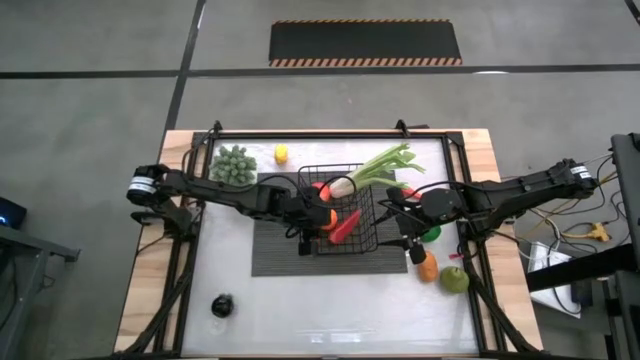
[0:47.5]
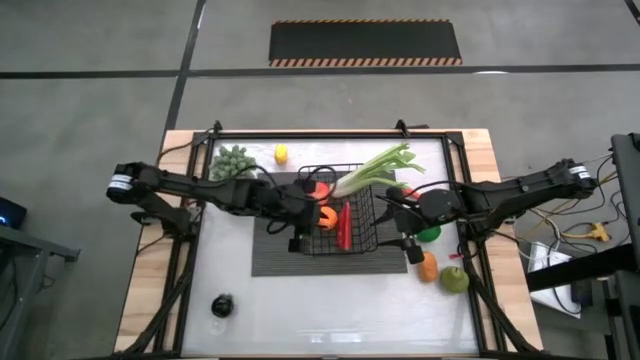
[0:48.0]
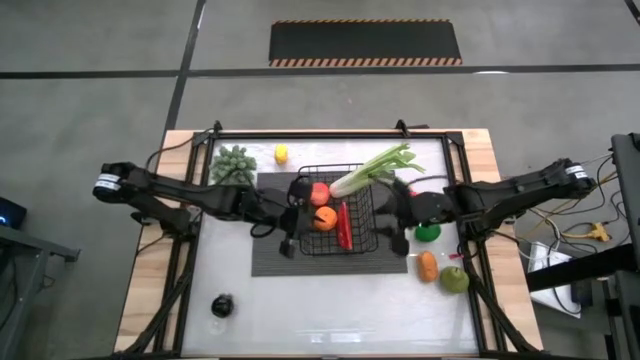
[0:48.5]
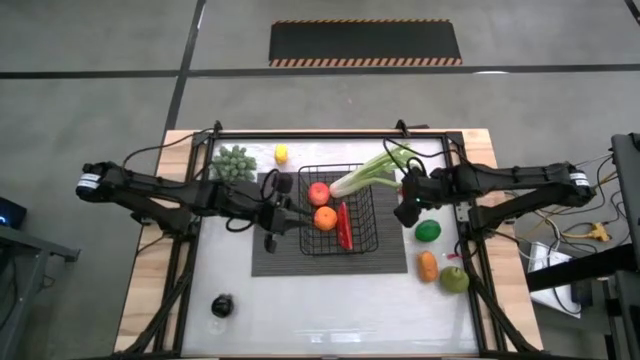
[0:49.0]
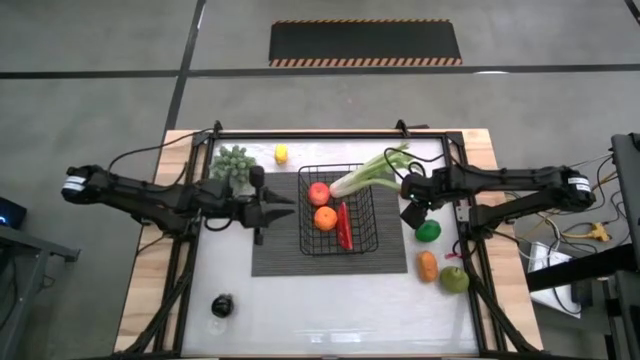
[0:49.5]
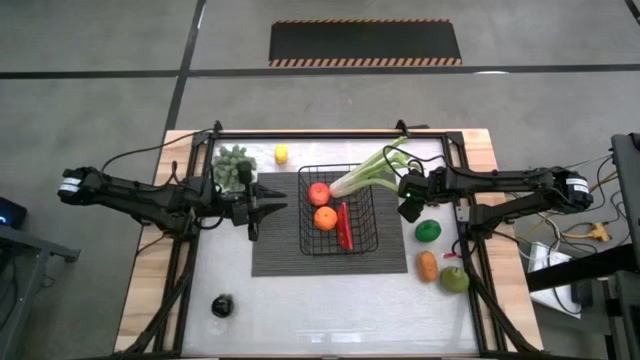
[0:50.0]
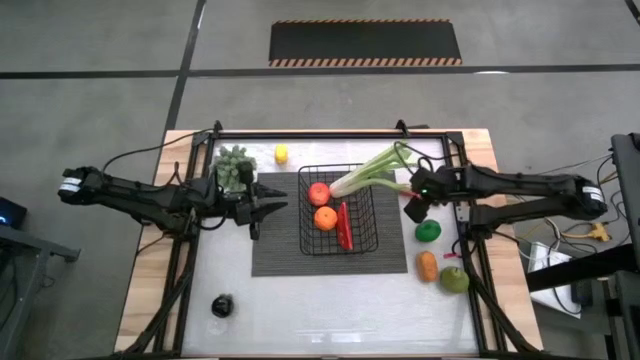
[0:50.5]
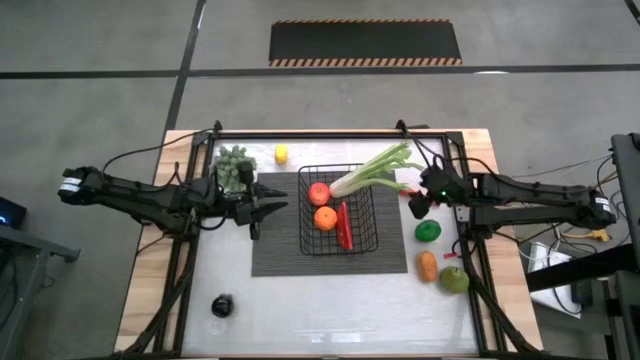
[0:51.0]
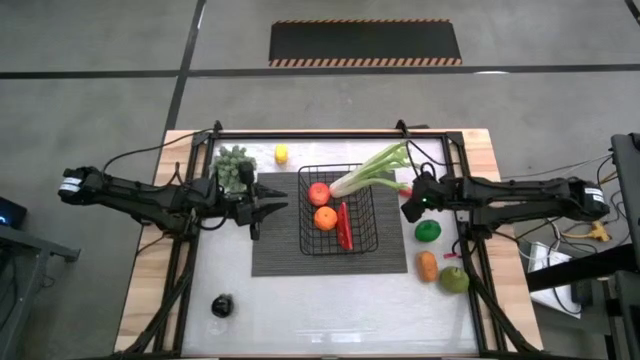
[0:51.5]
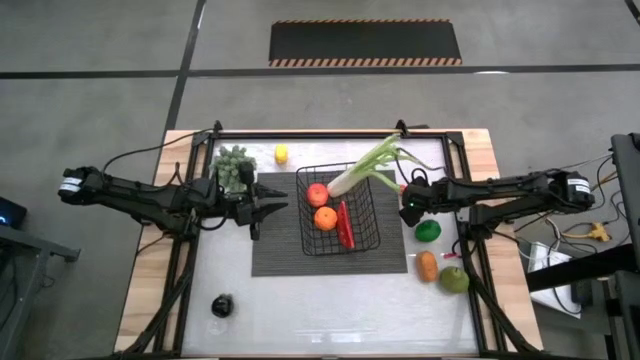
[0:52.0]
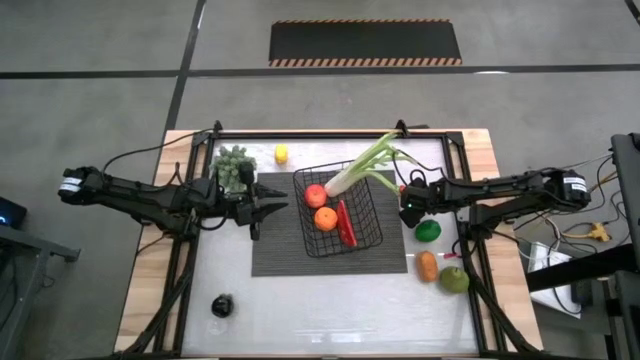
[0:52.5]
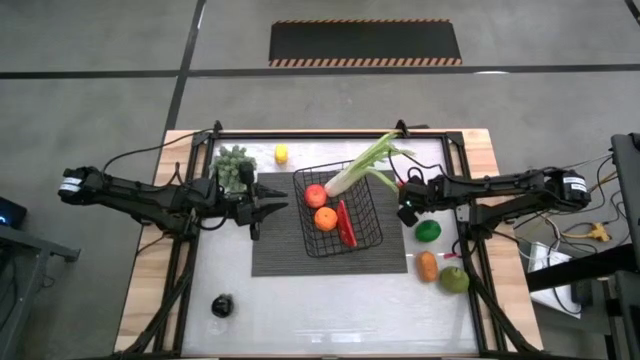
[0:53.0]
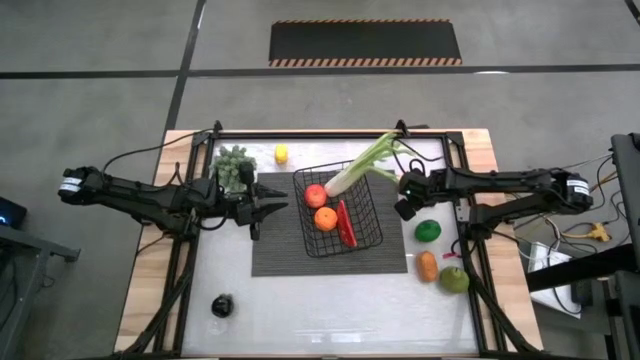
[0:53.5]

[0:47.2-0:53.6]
Task: Build produce basket
Put the carrot into the wire basket

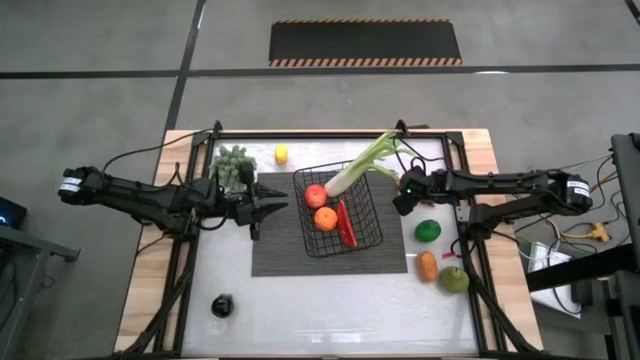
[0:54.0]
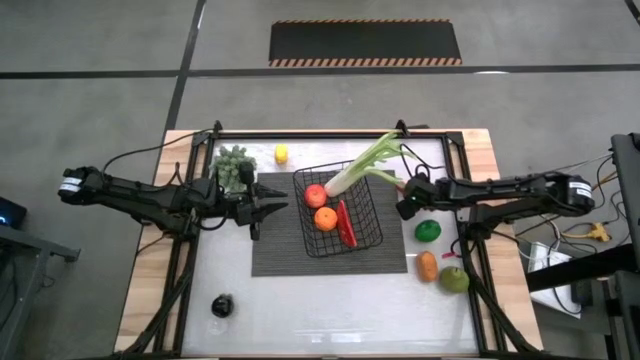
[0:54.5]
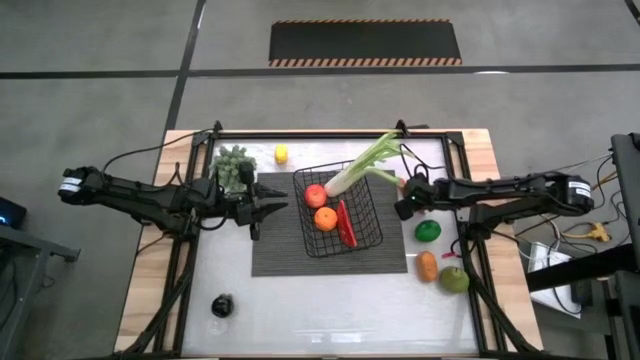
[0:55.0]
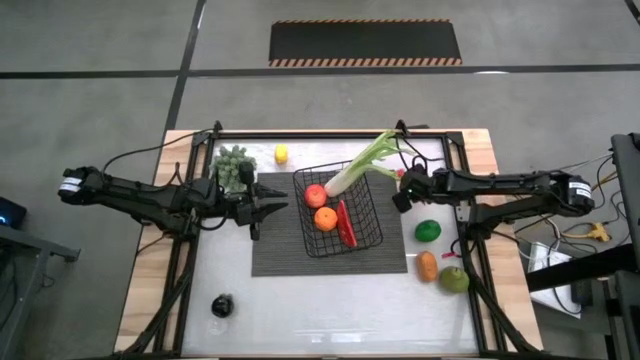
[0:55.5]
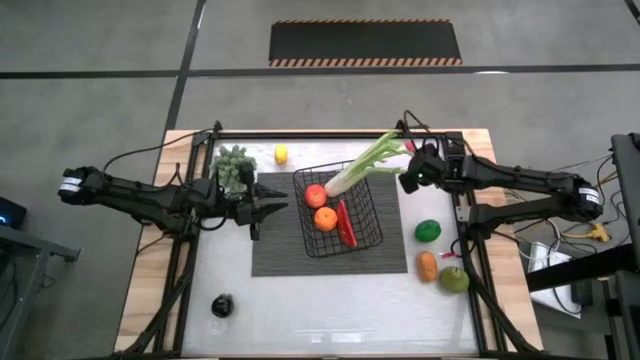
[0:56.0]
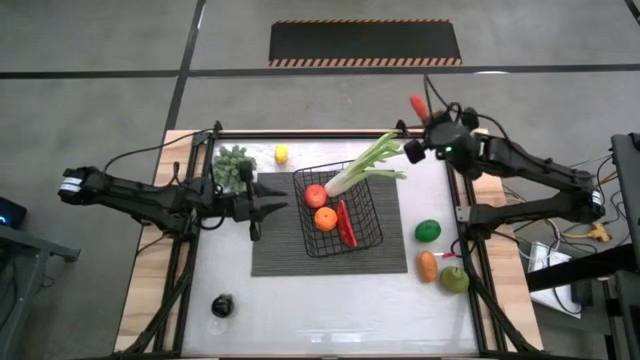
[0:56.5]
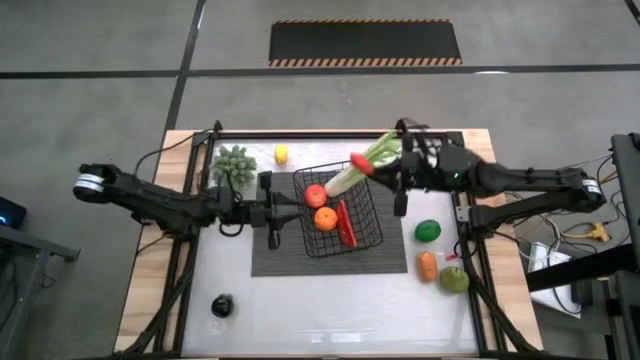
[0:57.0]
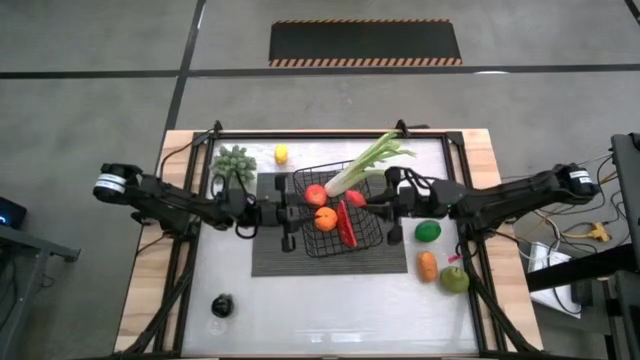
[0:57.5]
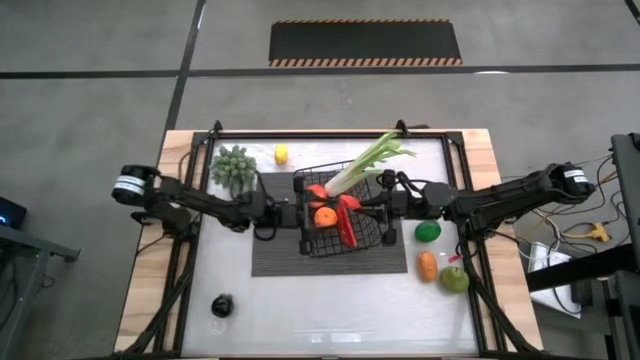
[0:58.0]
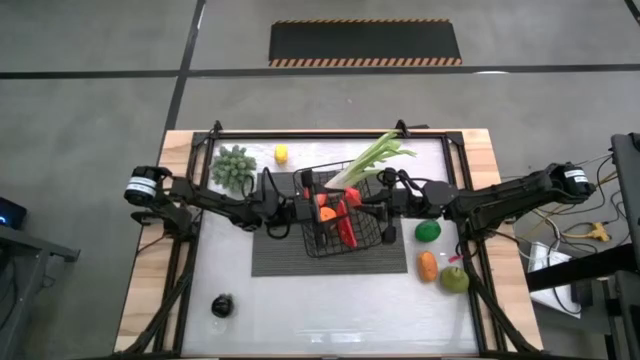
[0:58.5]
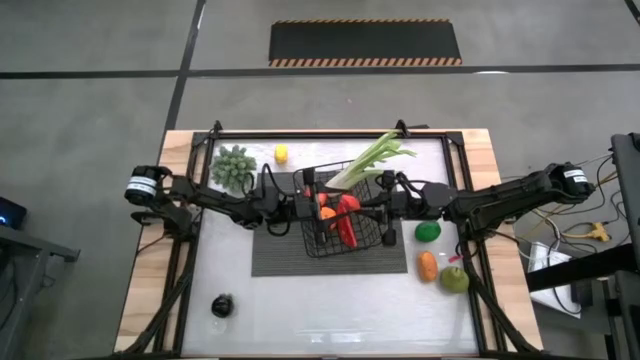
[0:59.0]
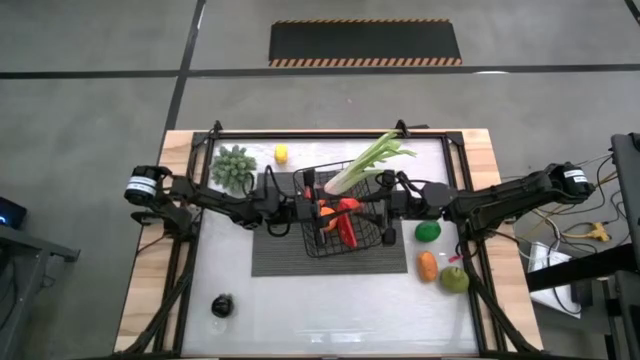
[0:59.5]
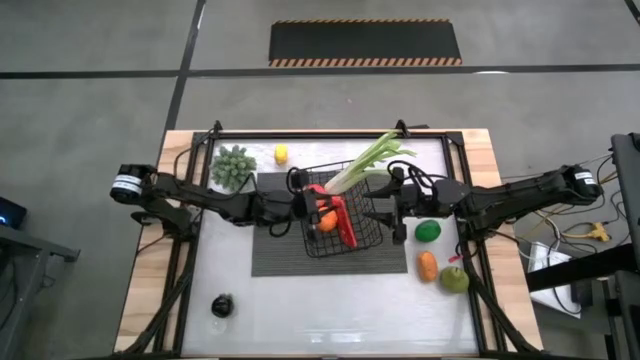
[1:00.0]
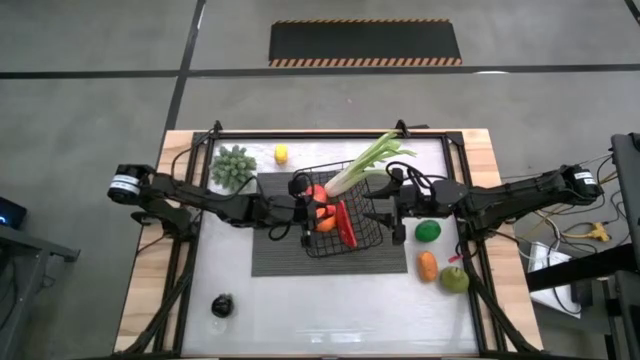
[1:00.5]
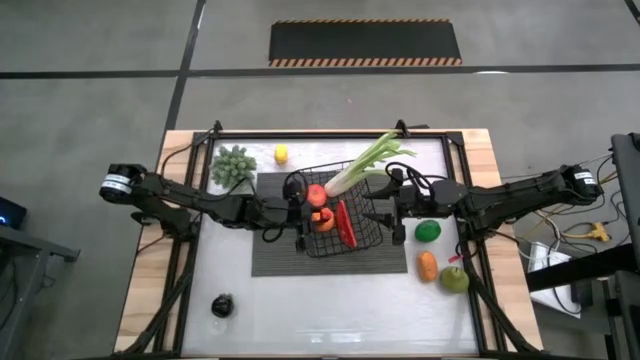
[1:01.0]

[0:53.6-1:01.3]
Put the carrot into the wire basket

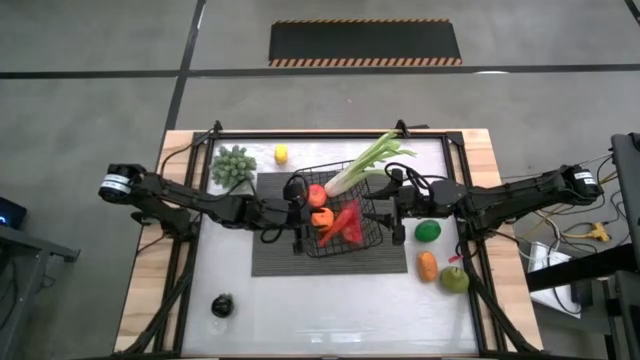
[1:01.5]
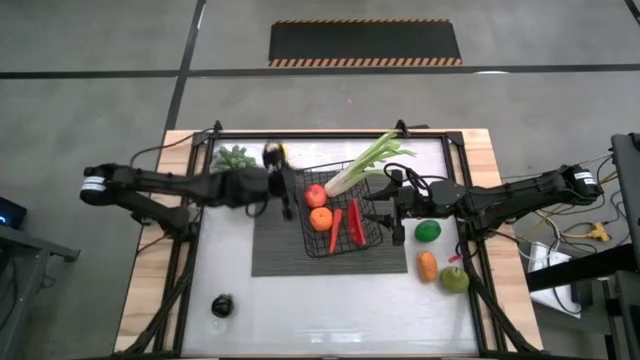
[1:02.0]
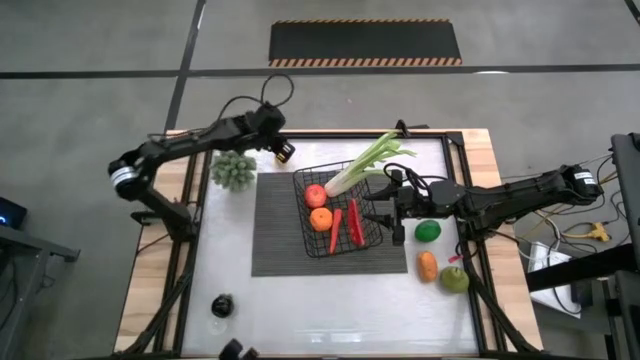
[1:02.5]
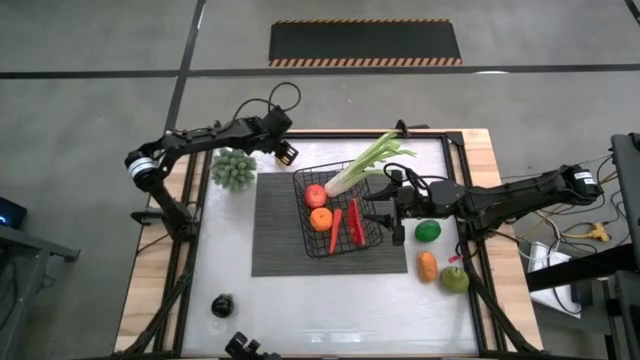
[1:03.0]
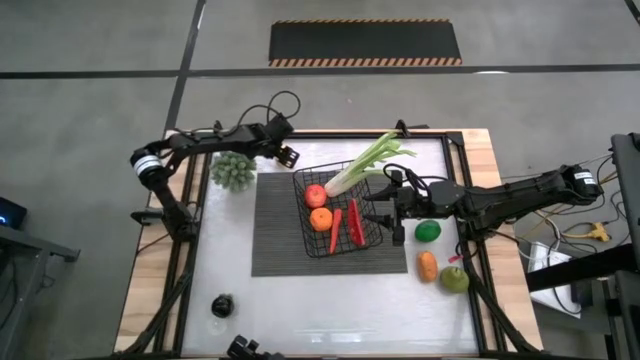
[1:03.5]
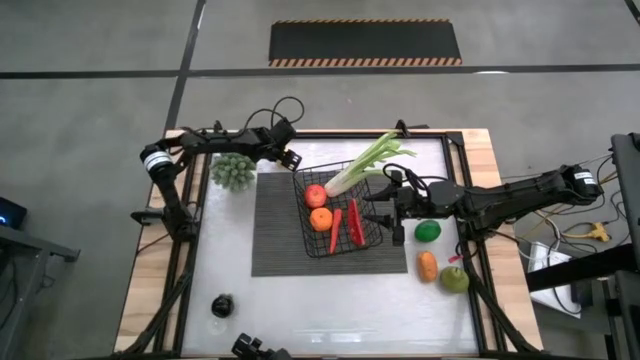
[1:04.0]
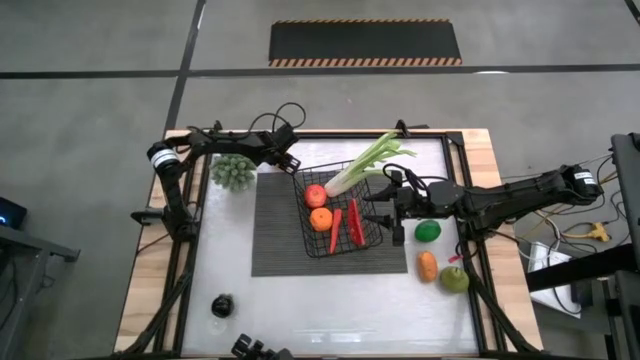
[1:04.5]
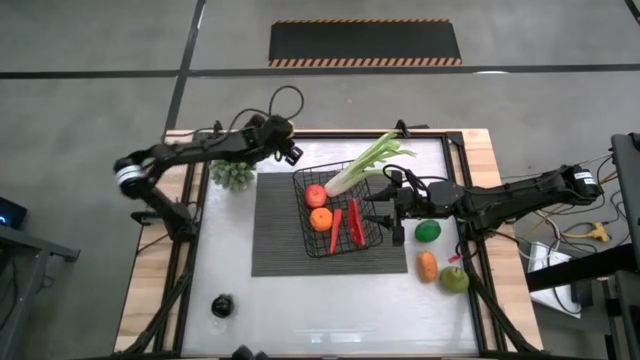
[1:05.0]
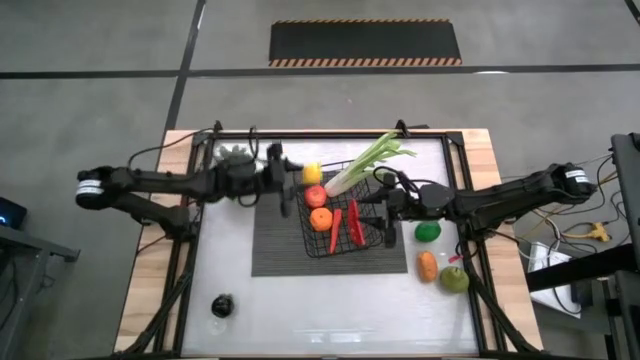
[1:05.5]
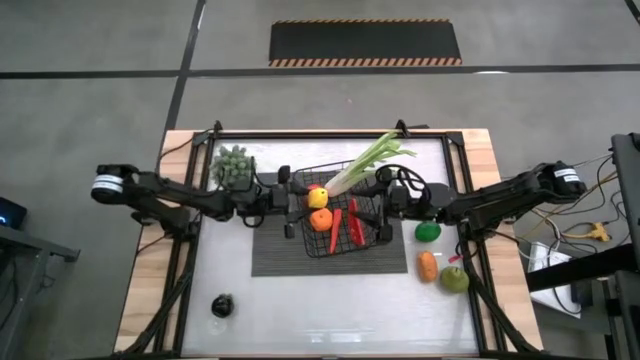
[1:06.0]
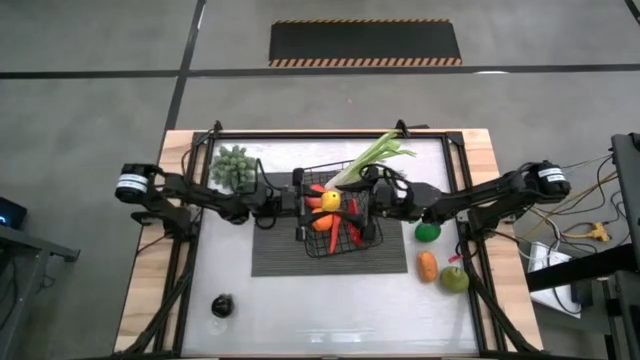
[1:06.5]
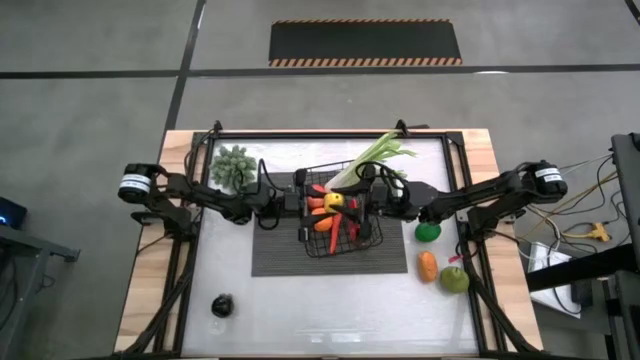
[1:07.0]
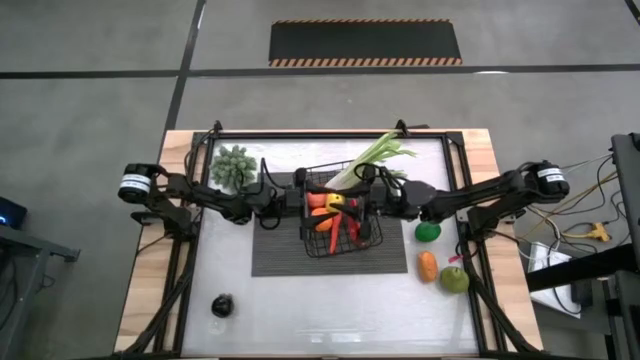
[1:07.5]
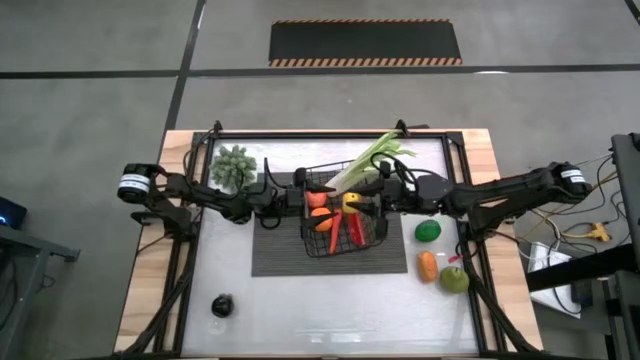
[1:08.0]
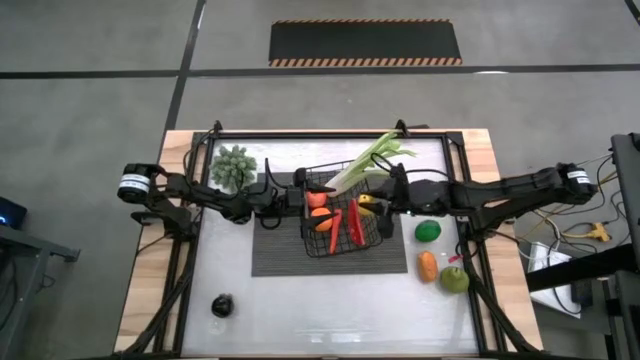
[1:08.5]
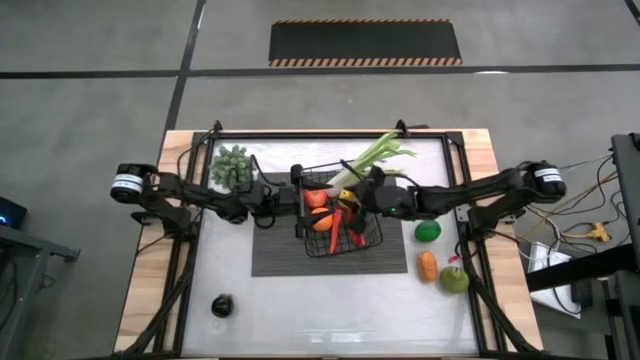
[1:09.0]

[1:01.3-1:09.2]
Put the lemon into the wire basket
